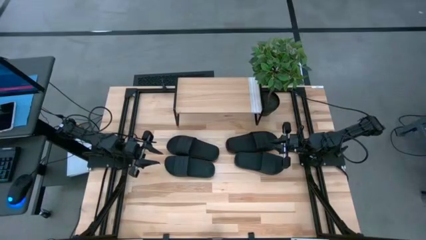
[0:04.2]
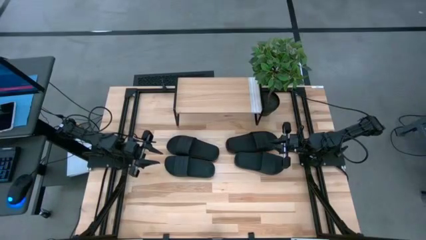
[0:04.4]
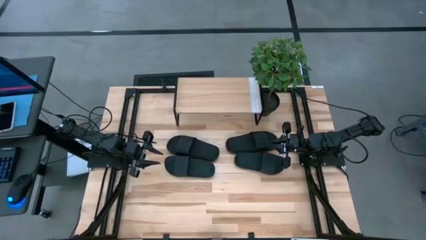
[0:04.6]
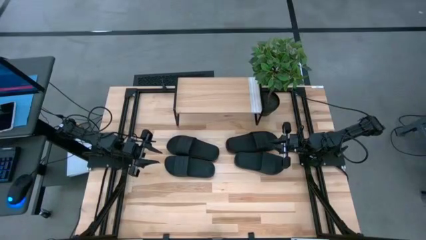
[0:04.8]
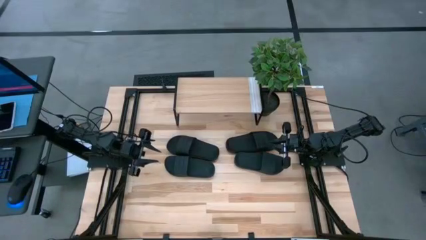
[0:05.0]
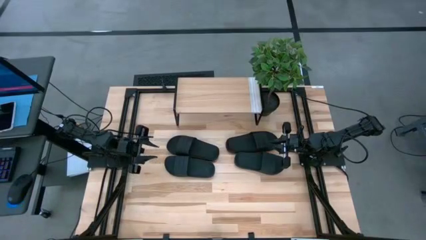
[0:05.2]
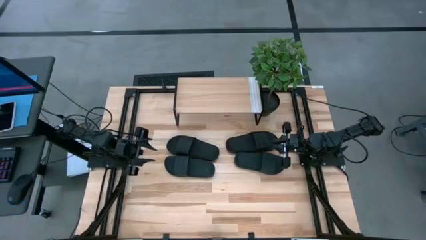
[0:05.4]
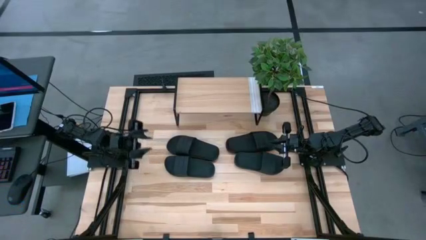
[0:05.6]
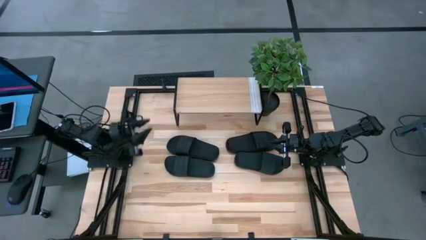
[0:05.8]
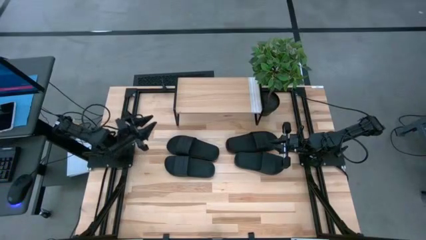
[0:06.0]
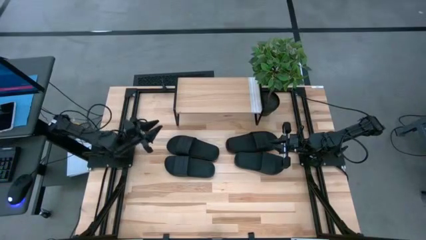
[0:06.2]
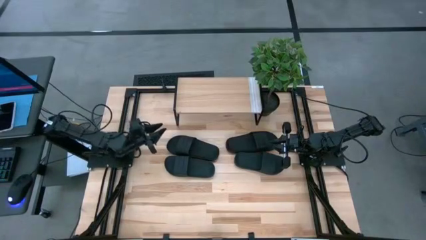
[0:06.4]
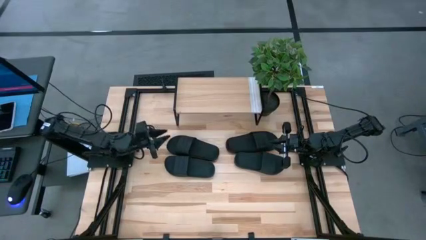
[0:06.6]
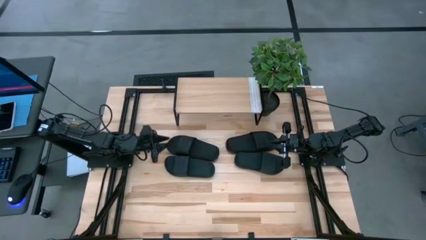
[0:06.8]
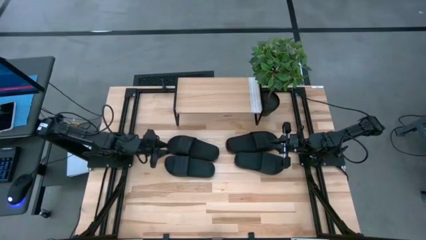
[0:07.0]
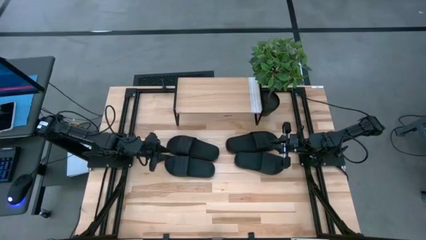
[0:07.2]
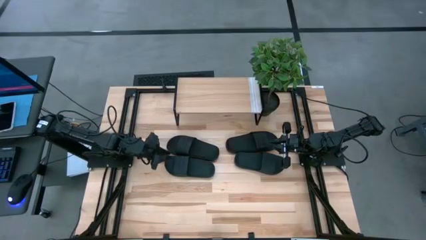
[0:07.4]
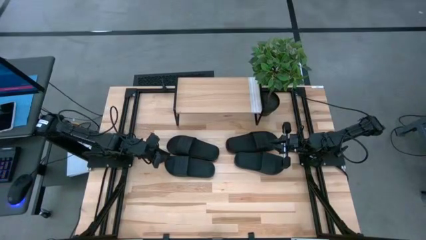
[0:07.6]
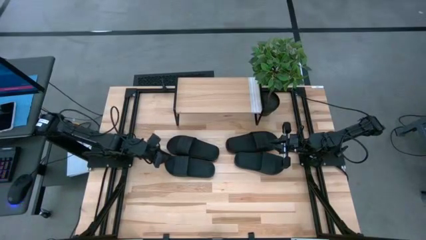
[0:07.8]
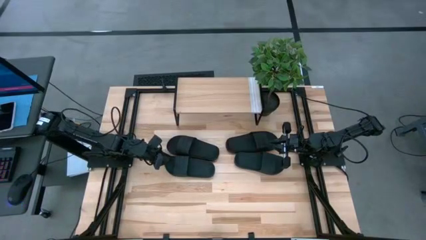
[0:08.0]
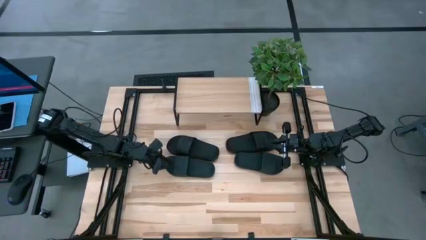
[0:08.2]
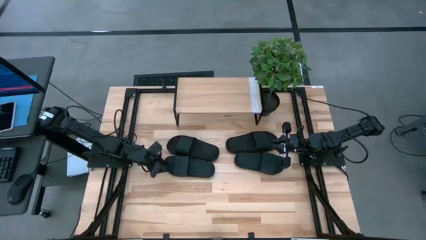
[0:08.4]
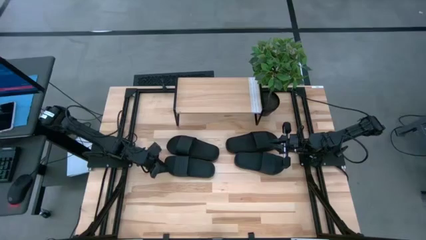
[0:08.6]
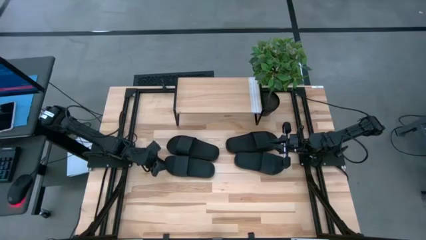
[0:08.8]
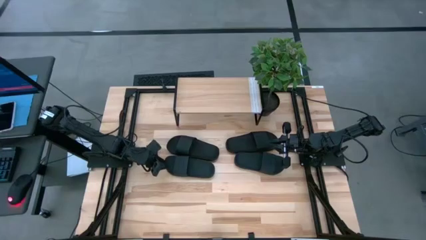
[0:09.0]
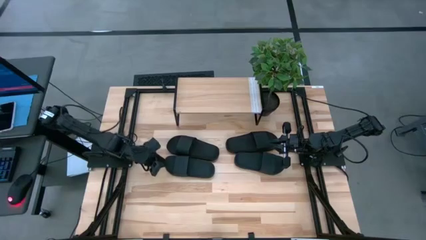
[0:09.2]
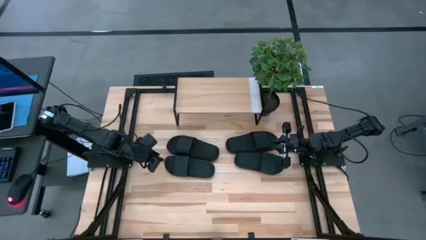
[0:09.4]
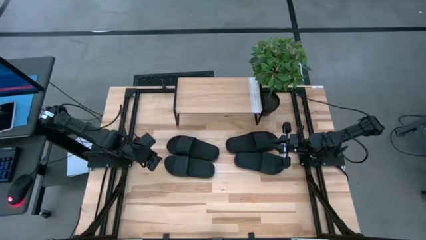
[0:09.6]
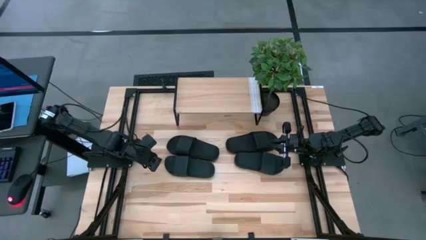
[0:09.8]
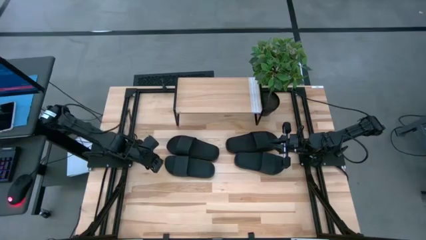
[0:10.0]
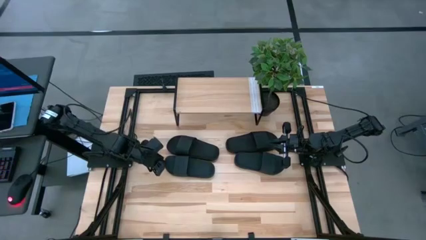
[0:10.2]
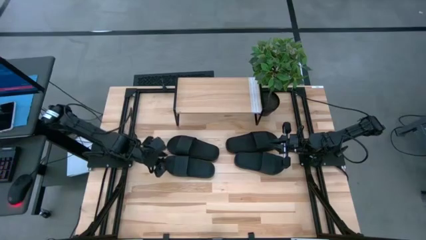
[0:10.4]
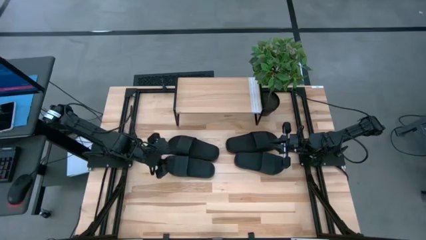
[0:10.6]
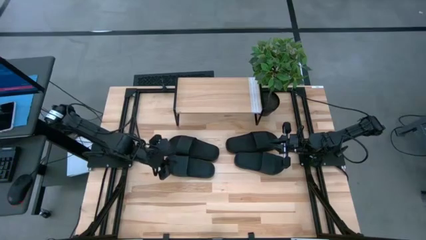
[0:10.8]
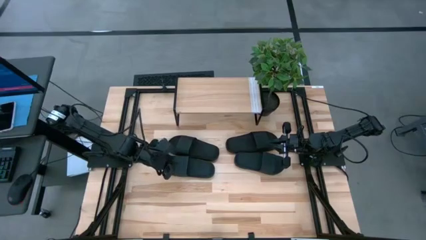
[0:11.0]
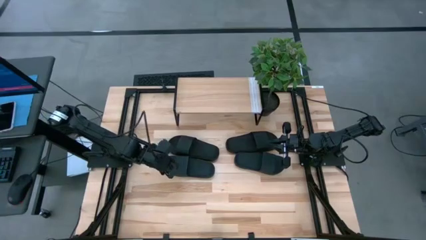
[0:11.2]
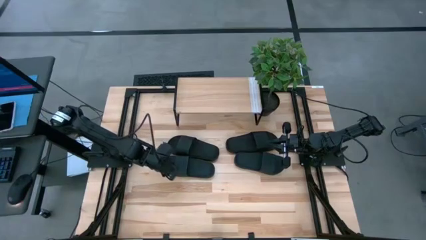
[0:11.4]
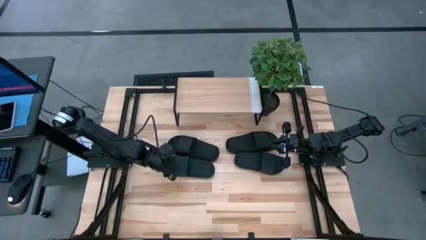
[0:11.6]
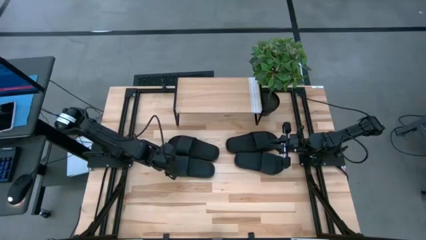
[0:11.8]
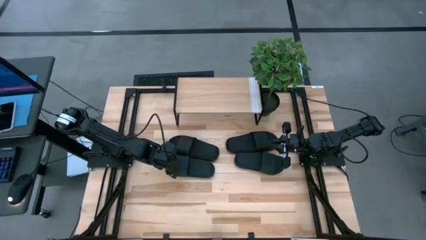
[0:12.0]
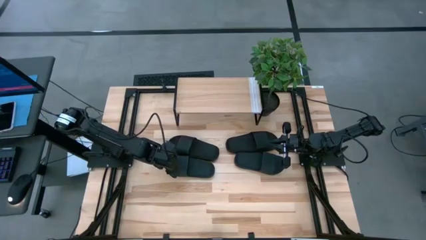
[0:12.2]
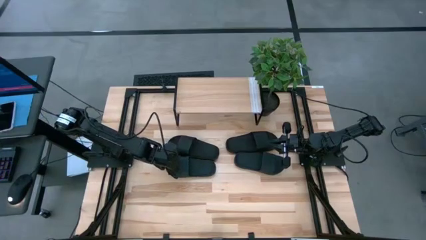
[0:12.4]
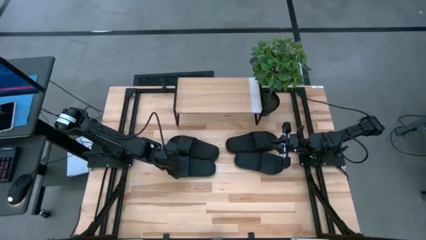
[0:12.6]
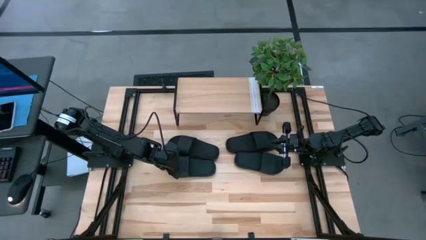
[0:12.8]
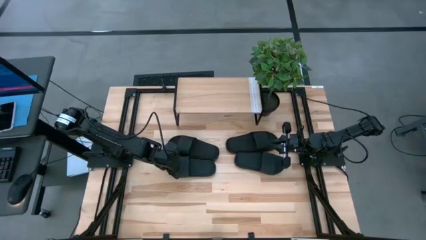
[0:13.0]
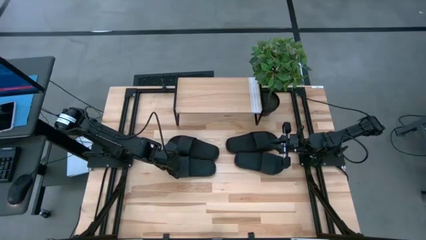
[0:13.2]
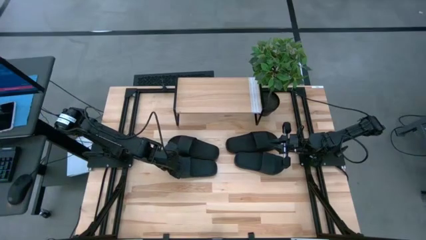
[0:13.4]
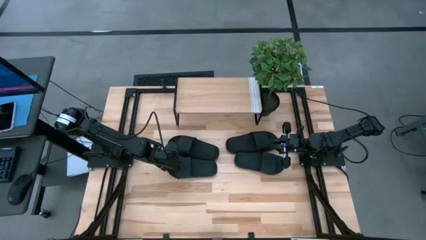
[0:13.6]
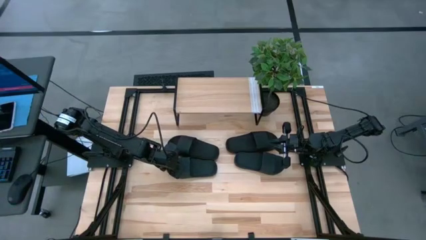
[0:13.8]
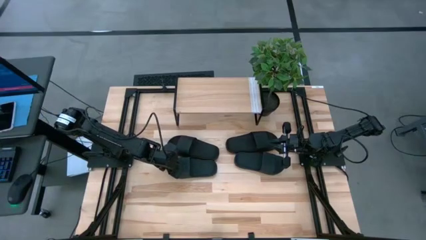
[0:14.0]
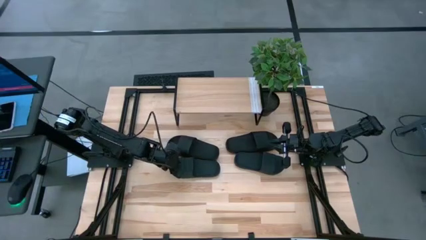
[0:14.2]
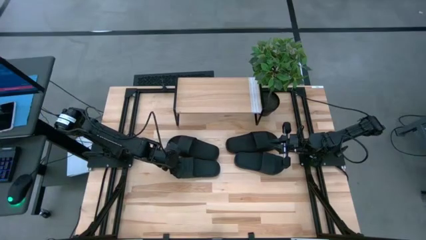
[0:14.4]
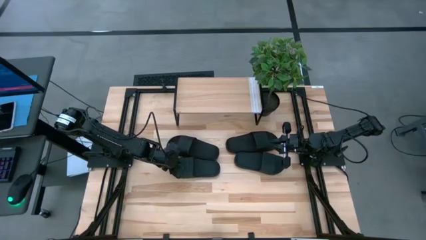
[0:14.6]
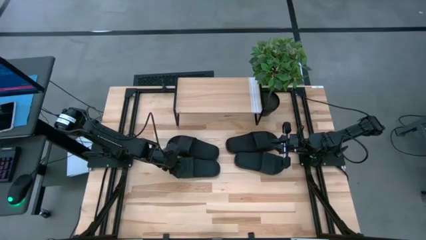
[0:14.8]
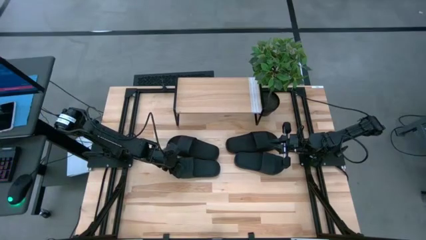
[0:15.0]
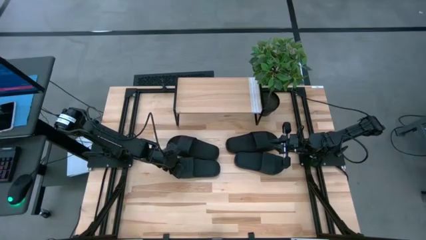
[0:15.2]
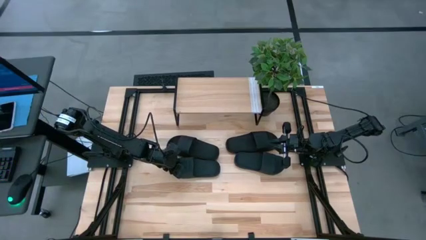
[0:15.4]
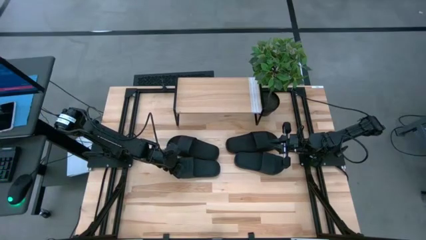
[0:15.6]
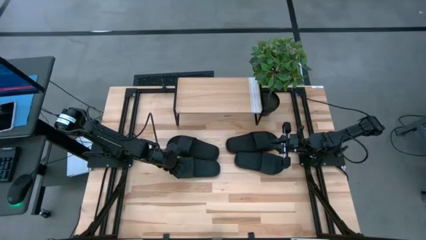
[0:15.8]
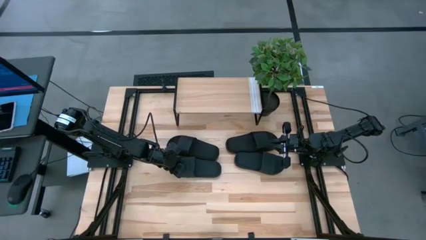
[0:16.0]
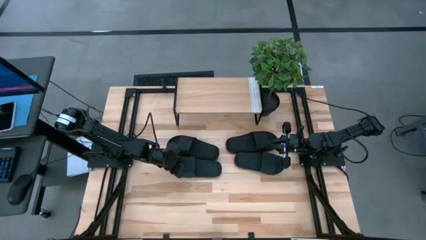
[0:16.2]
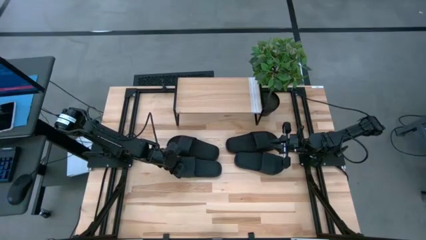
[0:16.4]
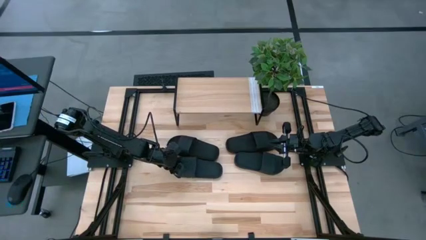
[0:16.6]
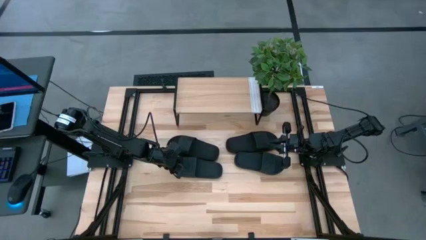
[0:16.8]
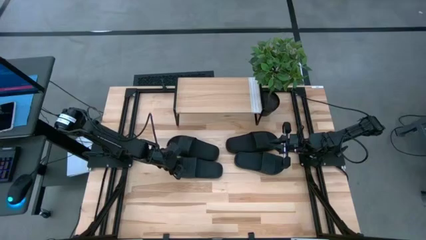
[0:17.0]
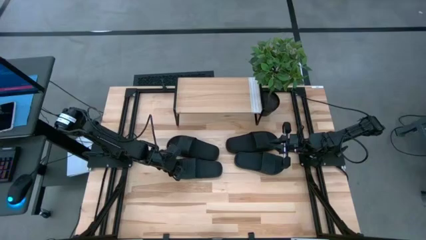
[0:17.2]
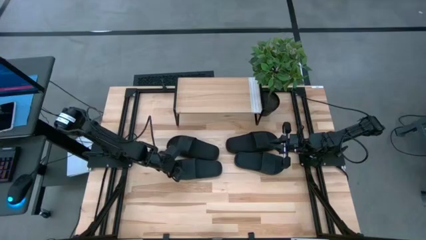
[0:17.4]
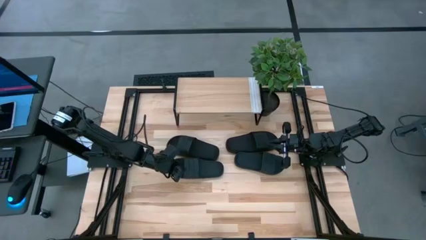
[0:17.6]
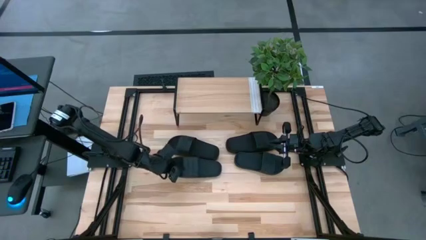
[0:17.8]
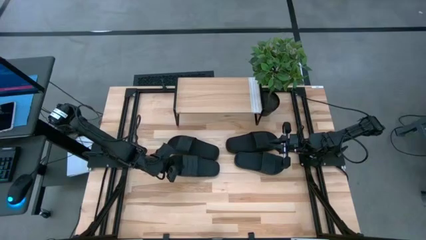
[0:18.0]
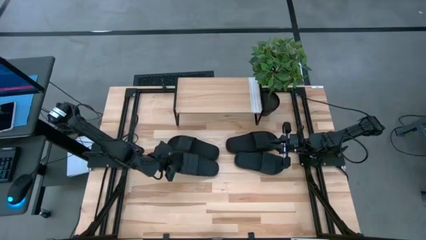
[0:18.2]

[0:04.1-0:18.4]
Task: Pick and place slides into the shelf
Put the bottom left black slide on the shelf
